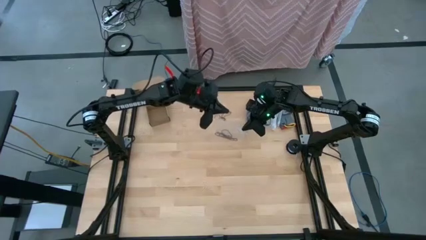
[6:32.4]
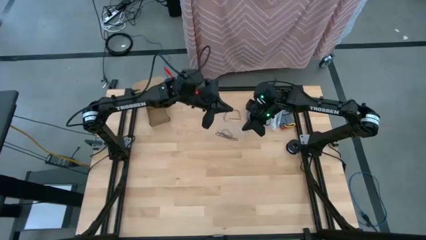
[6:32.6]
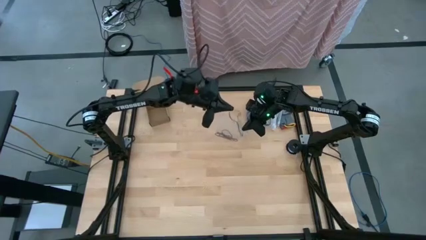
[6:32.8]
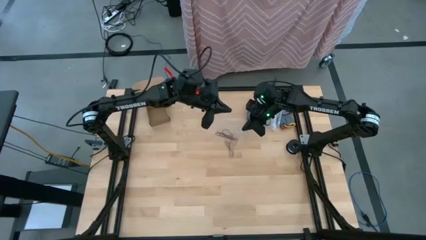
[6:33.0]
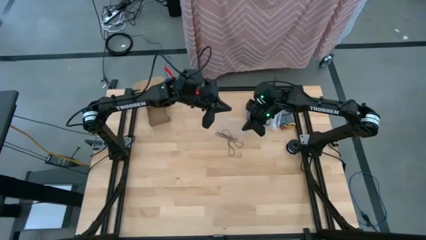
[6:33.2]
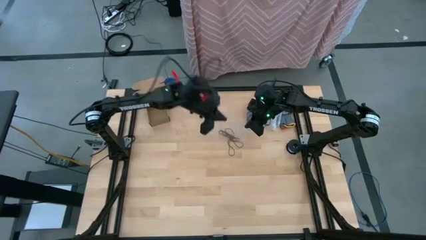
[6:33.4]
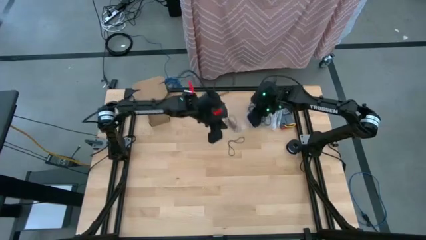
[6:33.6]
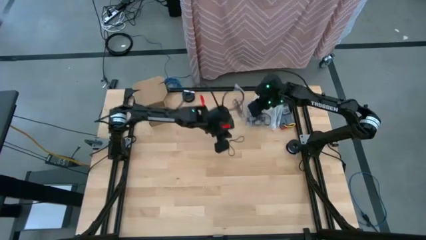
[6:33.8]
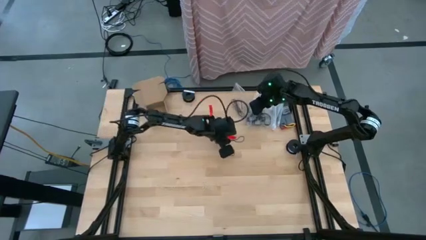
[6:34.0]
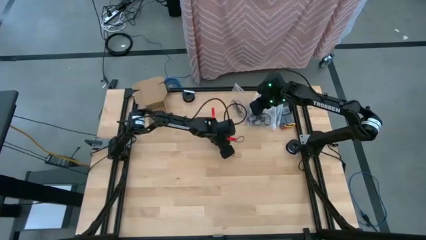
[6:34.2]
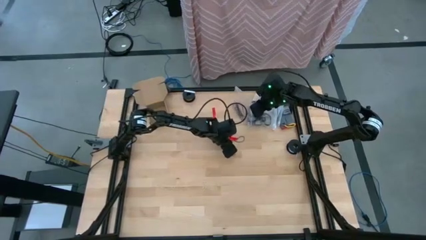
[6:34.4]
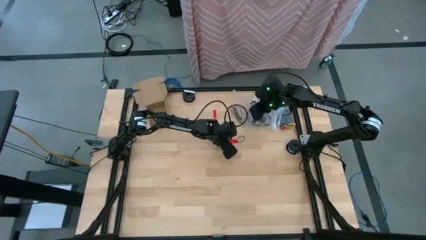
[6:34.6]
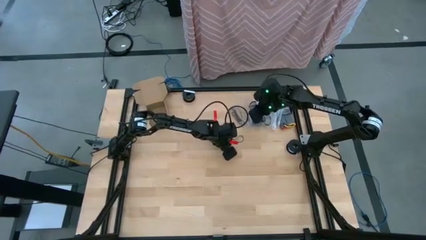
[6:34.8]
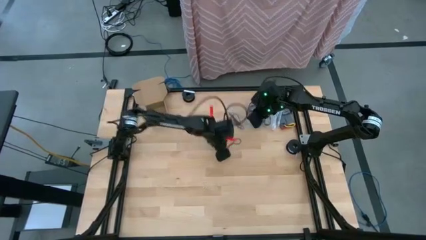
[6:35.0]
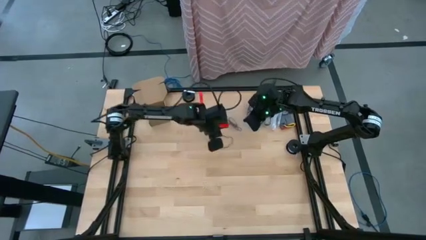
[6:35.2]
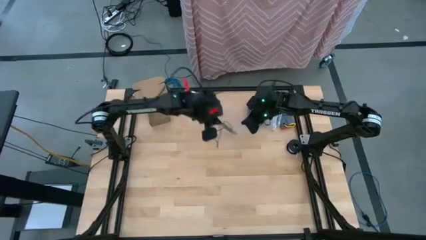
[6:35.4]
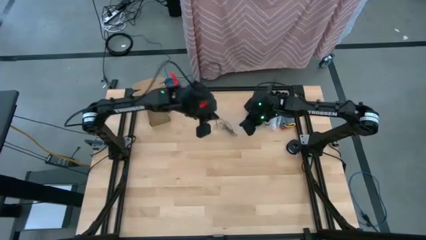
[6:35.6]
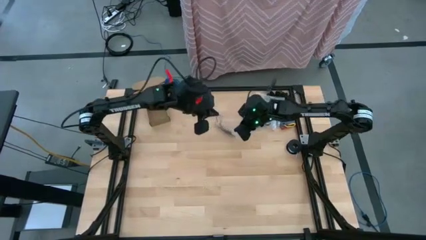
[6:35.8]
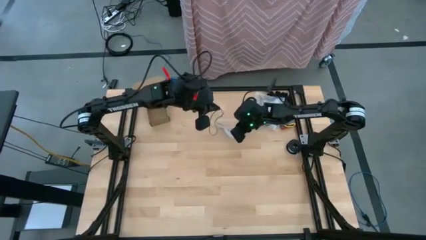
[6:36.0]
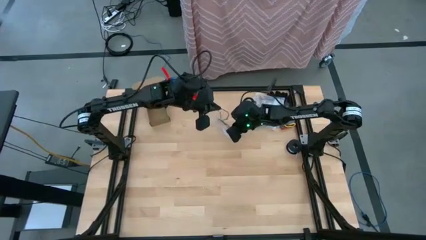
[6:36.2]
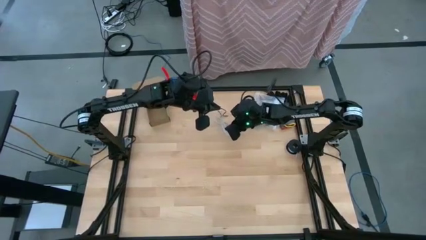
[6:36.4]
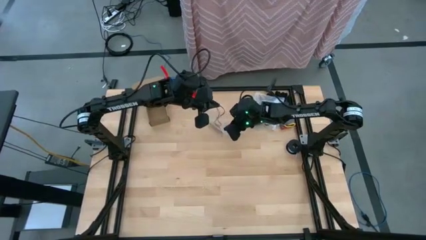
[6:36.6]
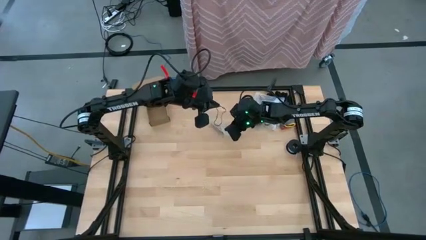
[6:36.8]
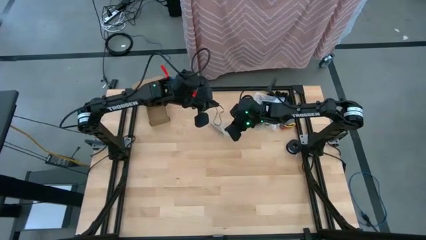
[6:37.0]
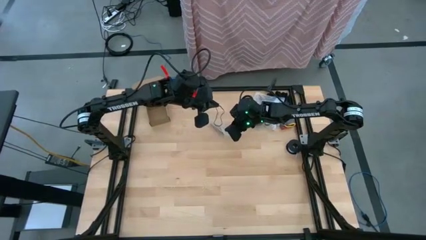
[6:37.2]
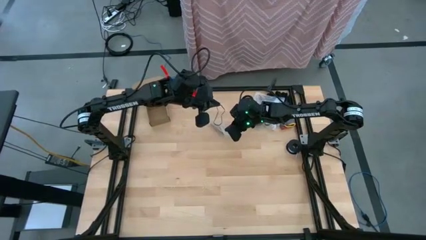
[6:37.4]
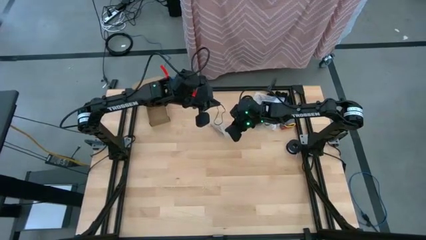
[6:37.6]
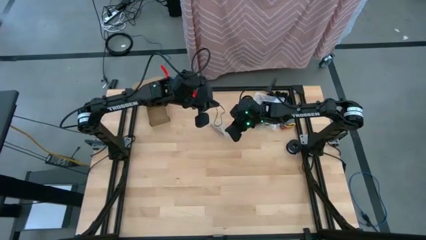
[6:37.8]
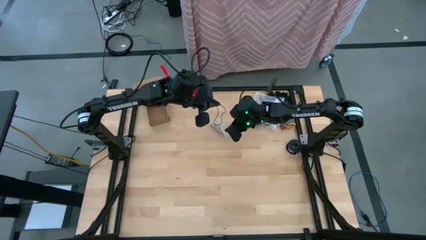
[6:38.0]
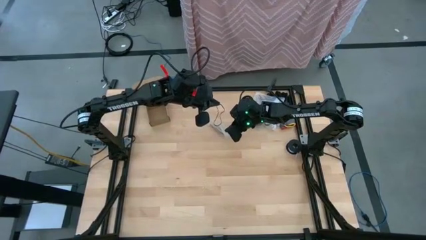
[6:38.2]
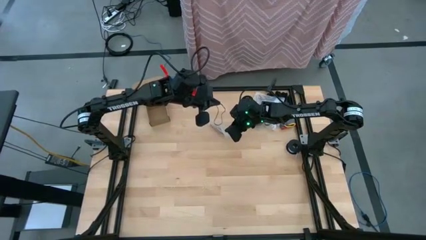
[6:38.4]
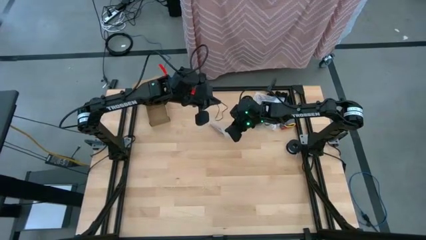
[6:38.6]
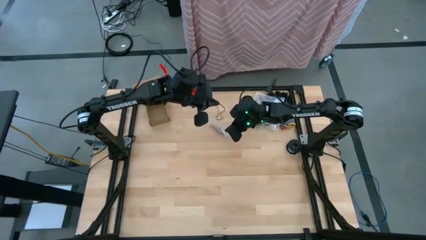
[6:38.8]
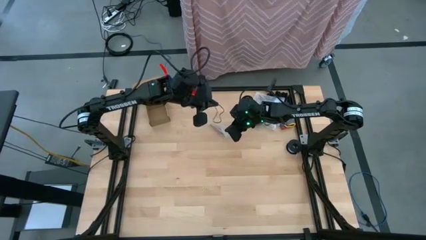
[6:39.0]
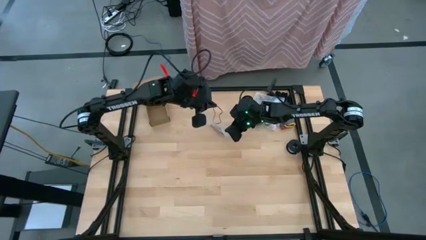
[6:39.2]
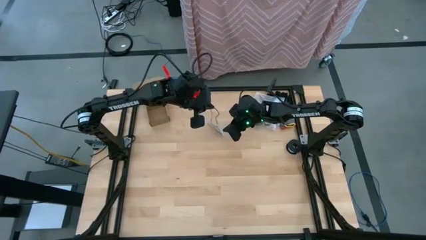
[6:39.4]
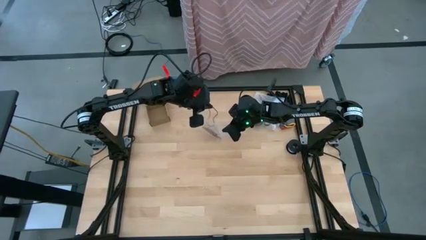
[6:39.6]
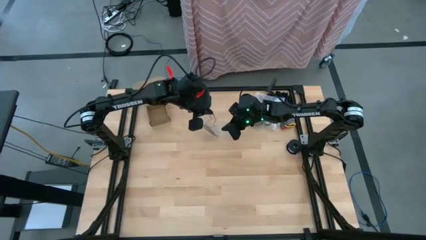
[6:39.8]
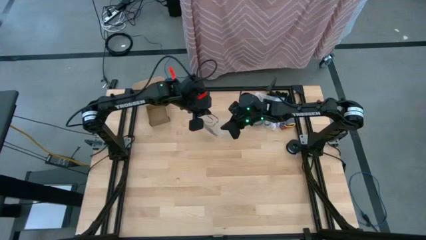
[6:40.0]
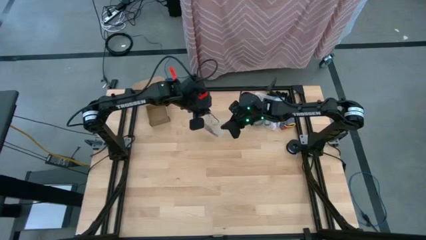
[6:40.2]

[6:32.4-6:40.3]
Task: Sort rubber bands
Put the black rubber band into the transparent zip bag

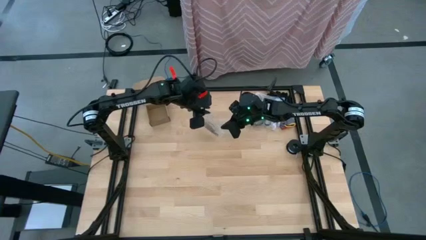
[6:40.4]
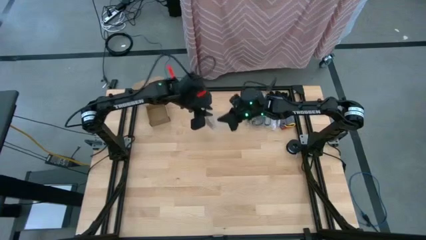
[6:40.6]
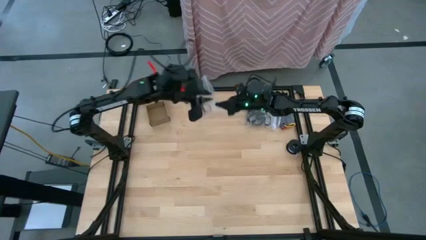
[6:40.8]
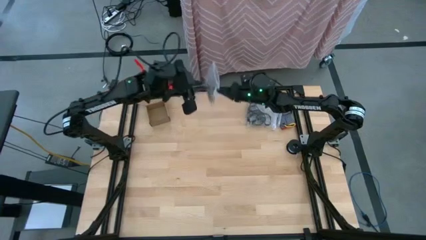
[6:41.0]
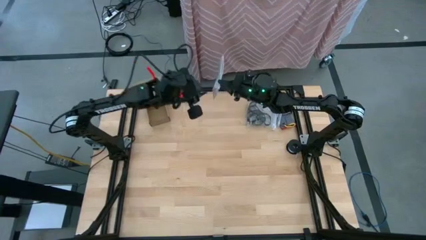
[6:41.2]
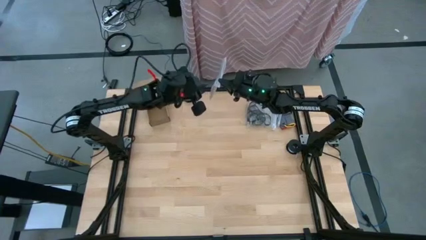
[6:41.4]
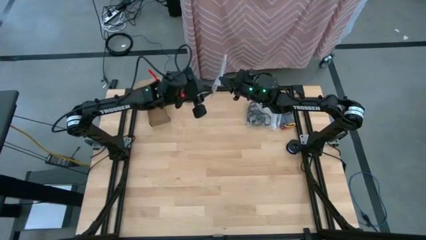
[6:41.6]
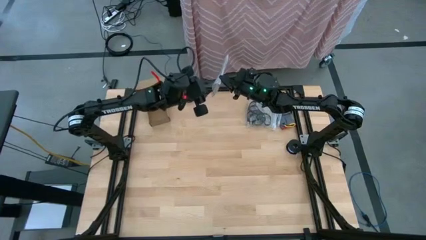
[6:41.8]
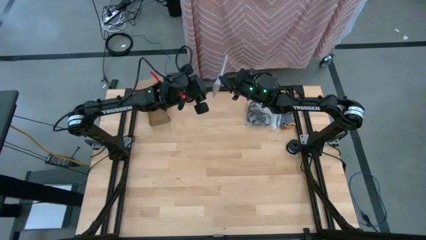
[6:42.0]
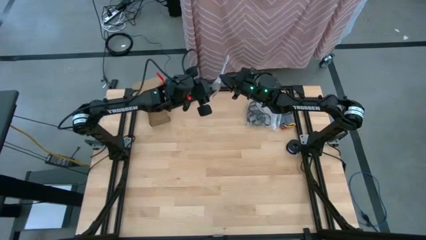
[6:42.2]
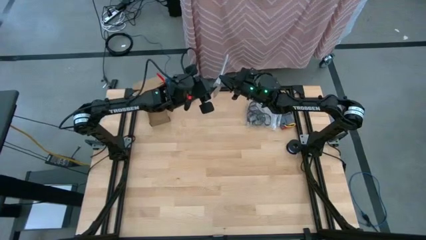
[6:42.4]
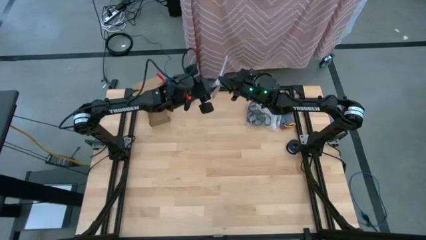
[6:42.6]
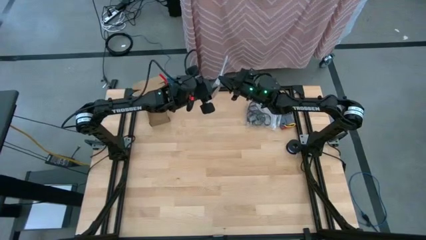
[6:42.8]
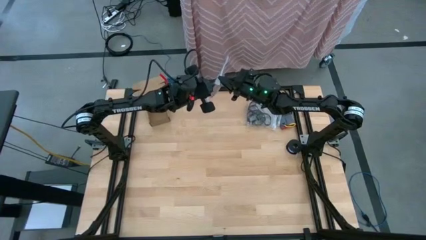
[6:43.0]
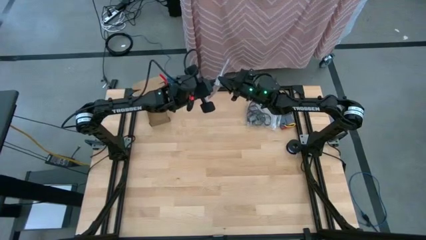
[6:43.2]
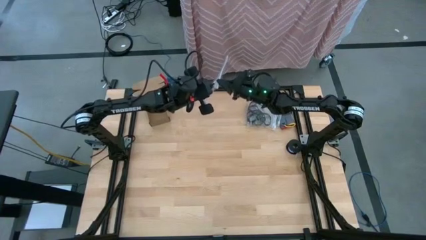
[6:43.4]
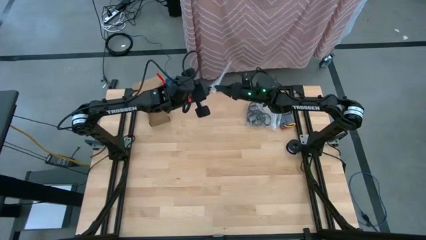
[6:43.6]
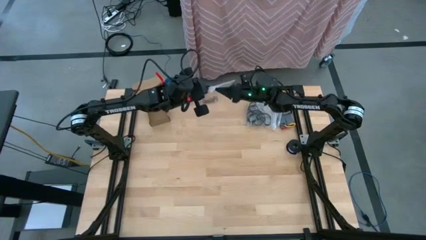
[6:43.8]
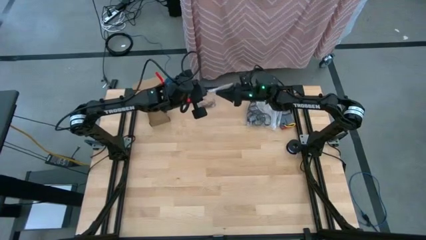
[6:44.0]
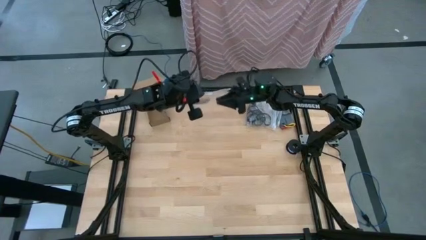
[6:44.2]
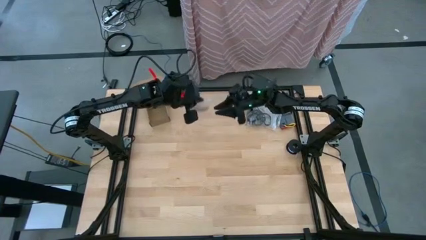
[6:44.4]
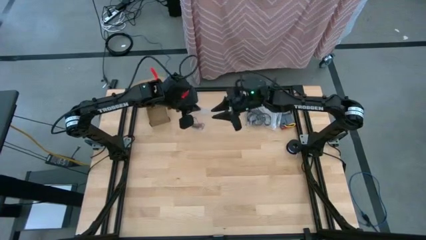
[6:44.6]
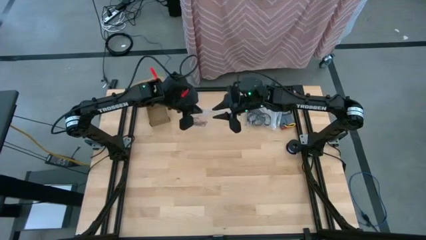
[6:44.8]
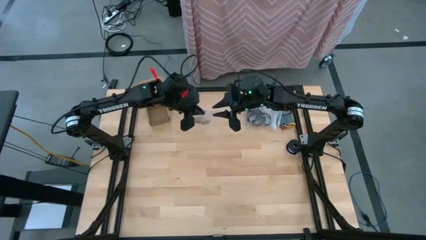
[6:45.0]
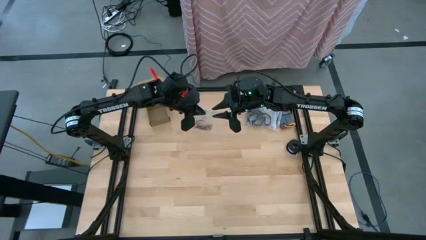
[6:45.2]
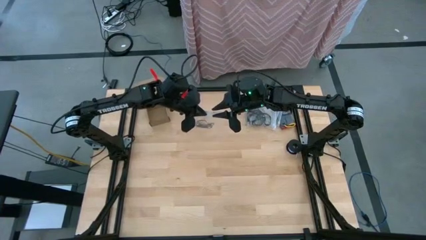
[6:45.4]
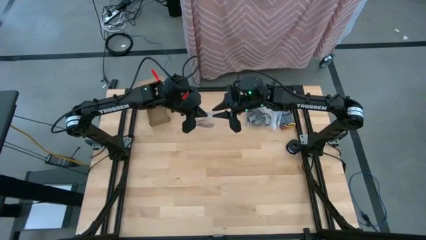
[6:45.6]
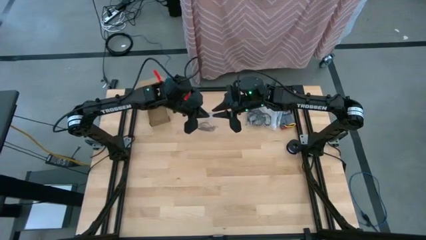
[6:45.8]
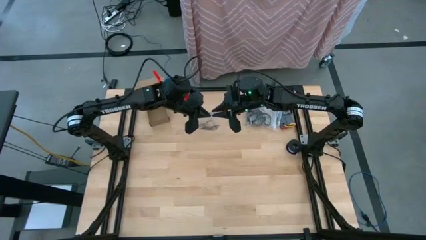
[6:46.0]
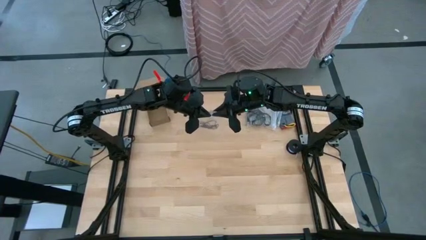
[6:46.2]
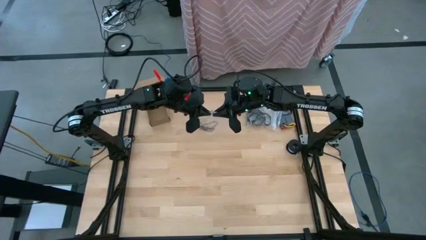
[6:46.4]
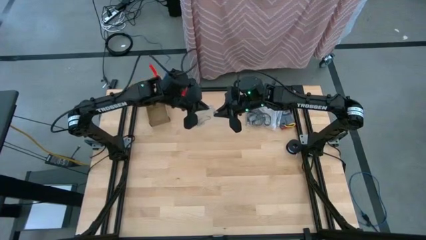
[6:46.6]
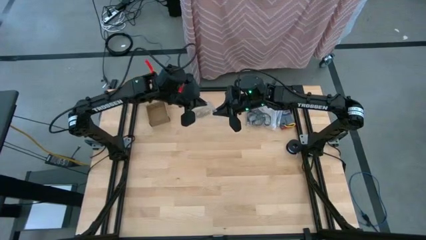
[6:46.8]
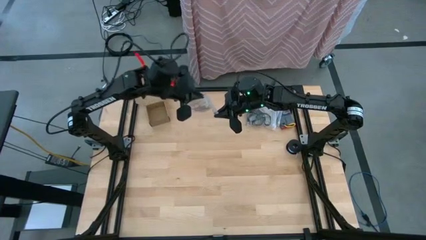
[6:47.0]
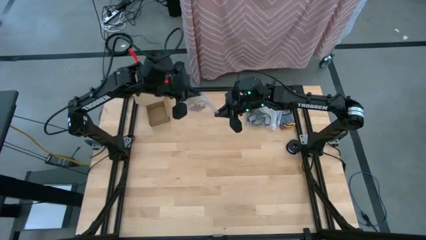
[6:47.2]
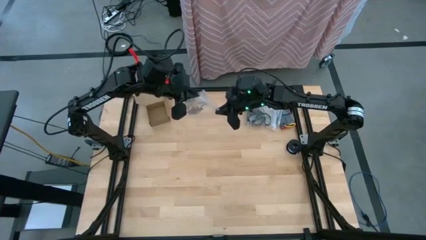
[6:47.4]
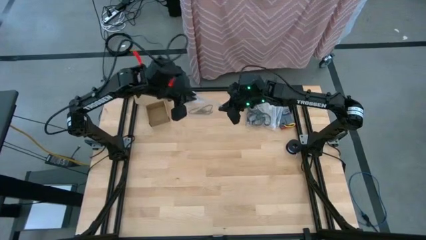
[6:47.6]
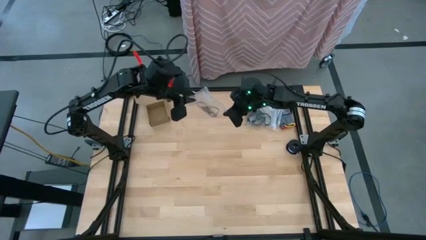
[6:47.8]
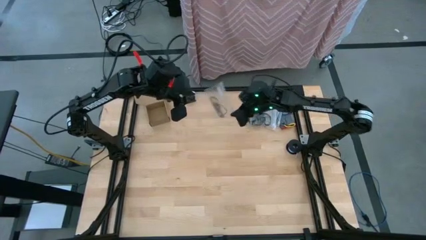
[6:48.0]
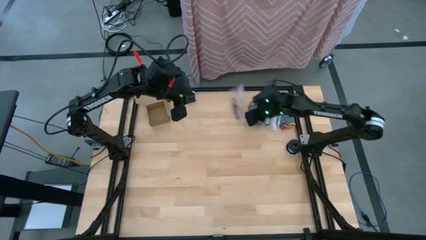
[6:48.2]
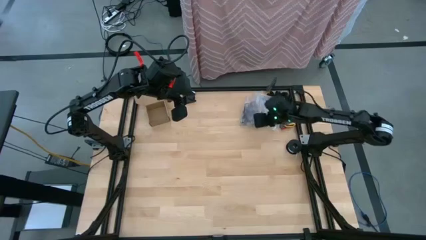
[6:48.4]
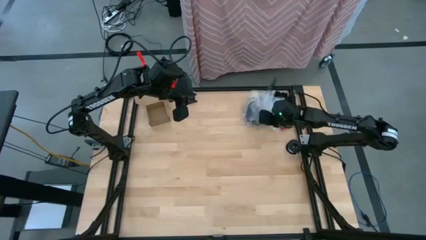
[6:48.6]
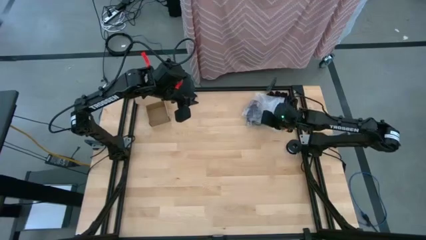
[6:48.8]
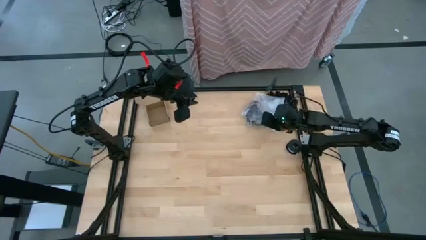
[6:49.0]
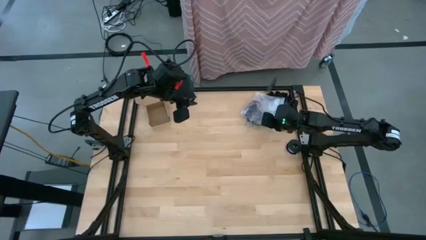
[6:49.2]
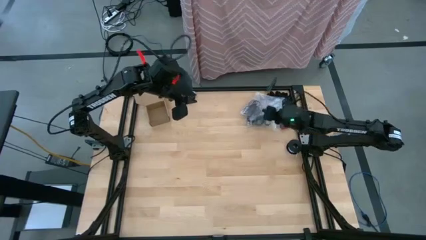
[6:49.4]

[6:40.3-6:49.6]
Close the transparent zip bag
